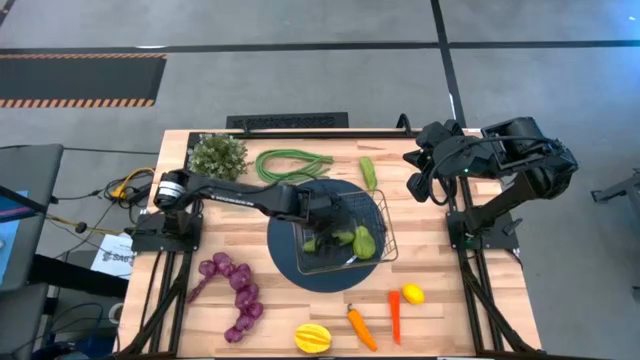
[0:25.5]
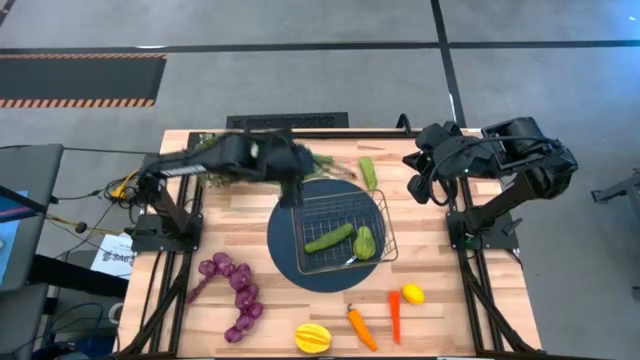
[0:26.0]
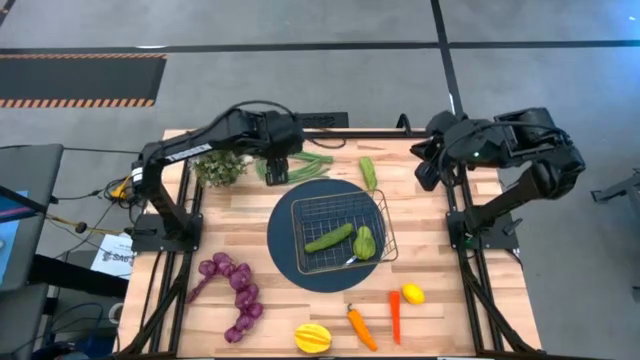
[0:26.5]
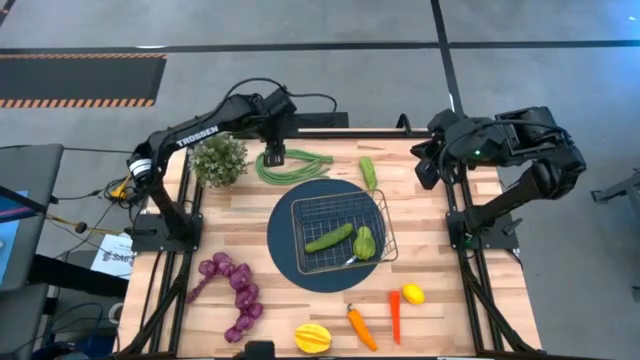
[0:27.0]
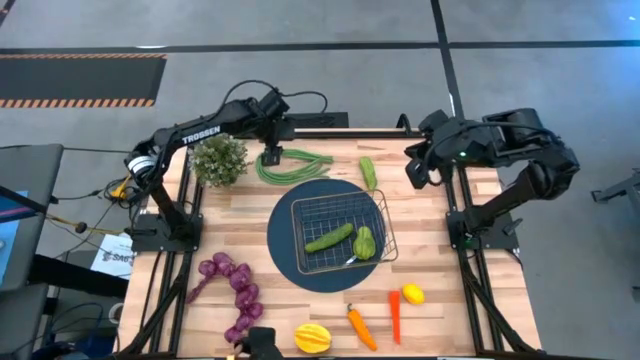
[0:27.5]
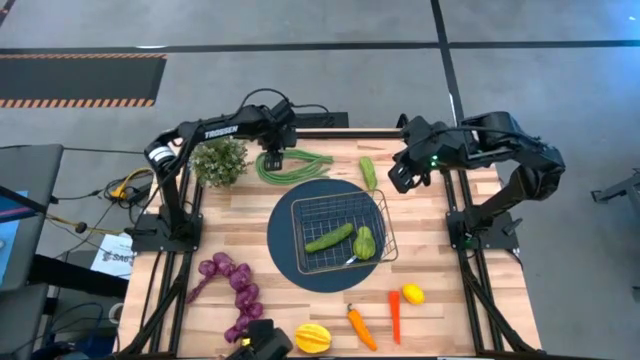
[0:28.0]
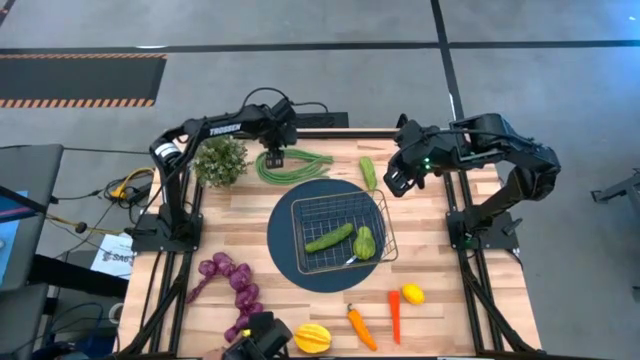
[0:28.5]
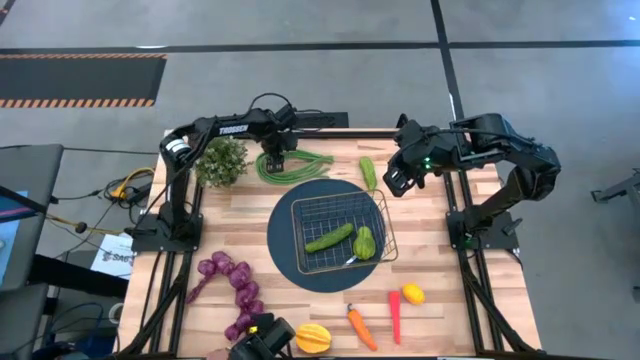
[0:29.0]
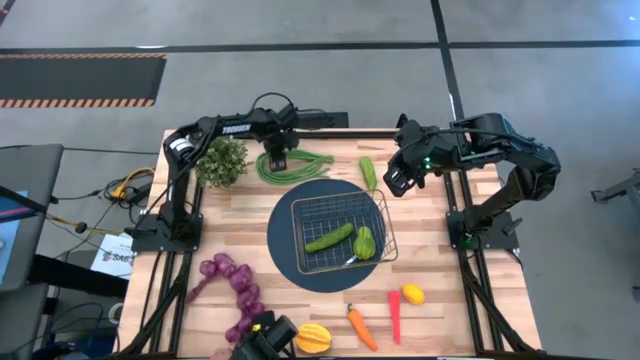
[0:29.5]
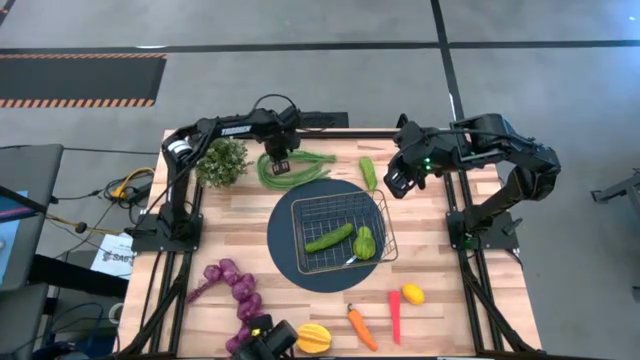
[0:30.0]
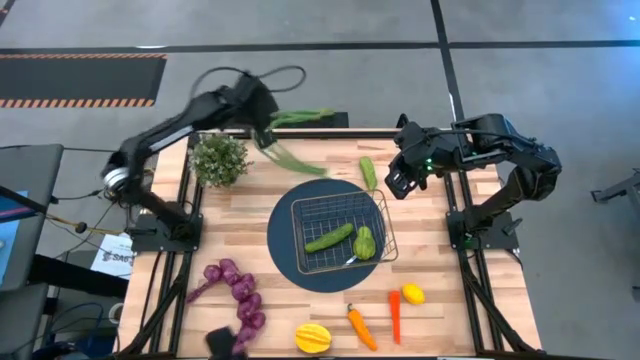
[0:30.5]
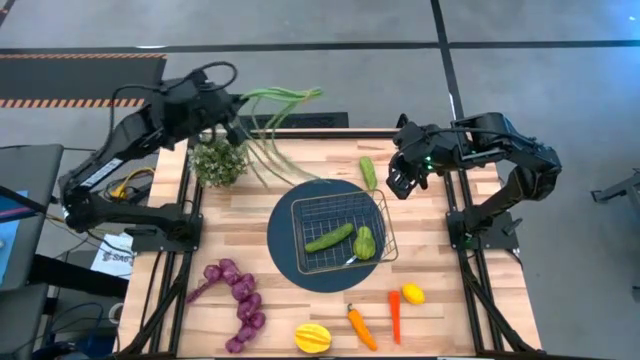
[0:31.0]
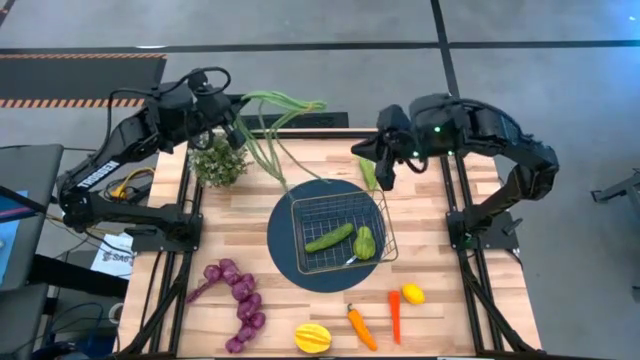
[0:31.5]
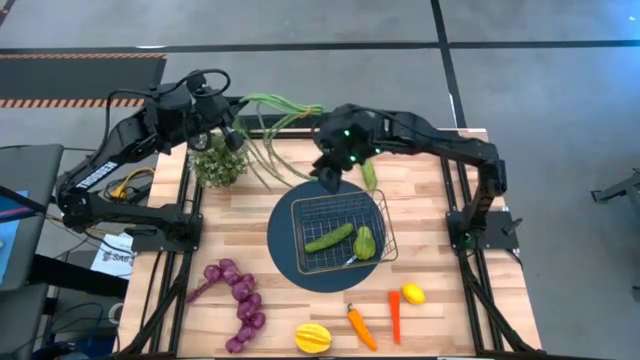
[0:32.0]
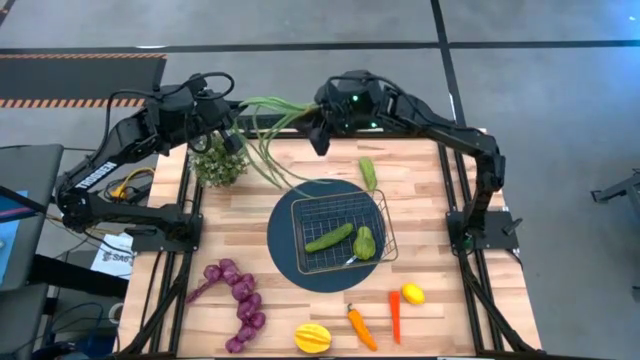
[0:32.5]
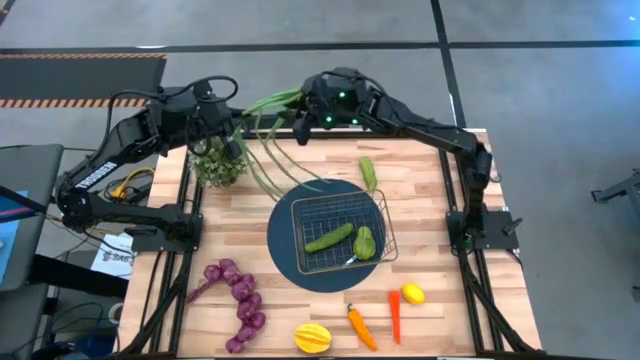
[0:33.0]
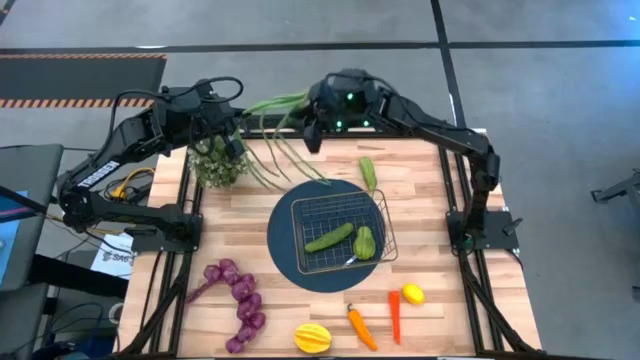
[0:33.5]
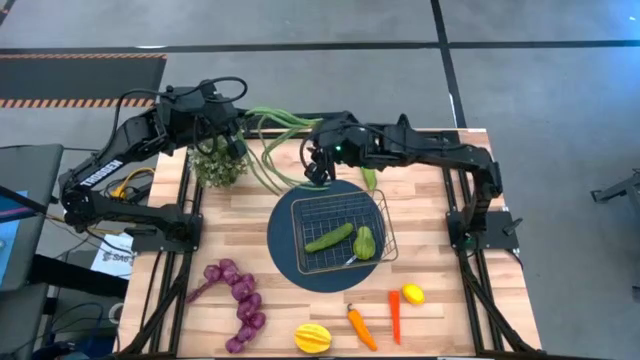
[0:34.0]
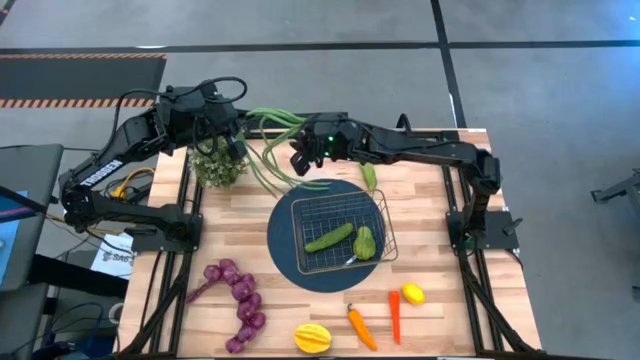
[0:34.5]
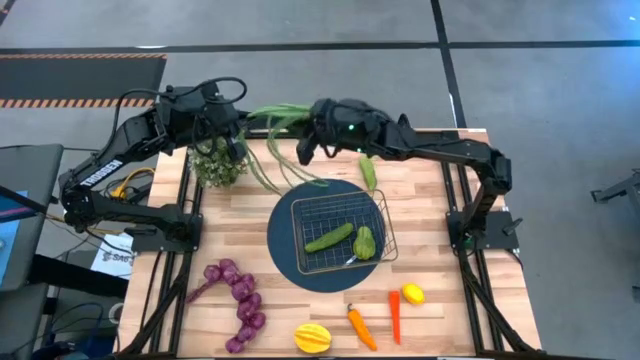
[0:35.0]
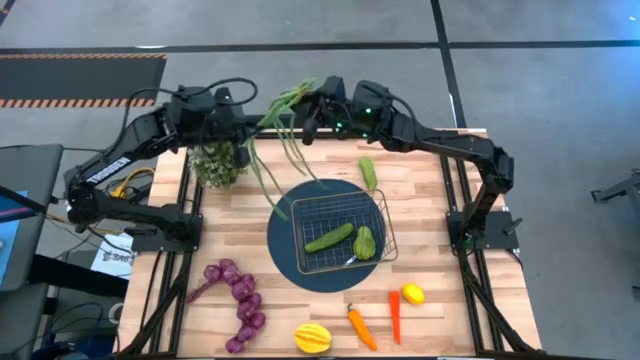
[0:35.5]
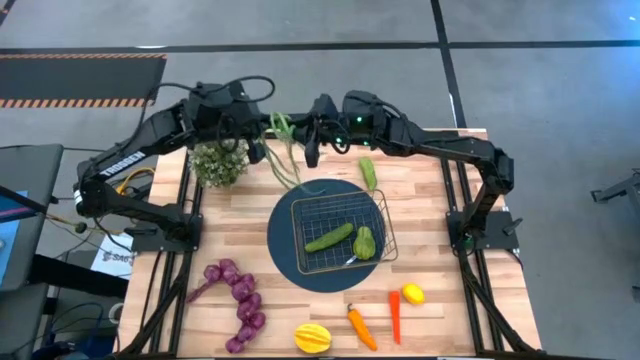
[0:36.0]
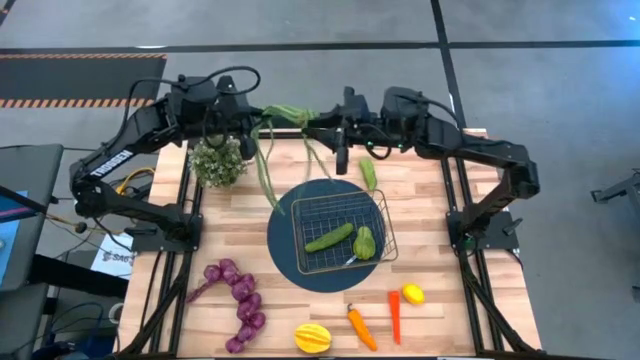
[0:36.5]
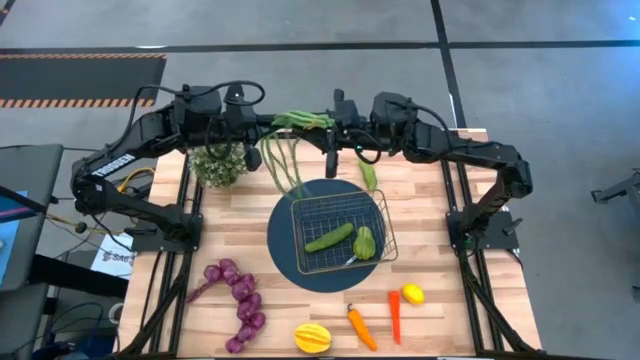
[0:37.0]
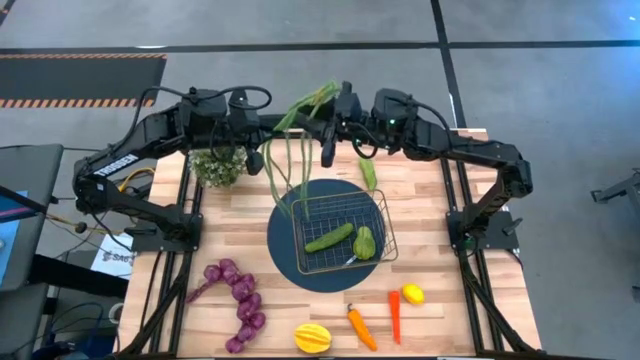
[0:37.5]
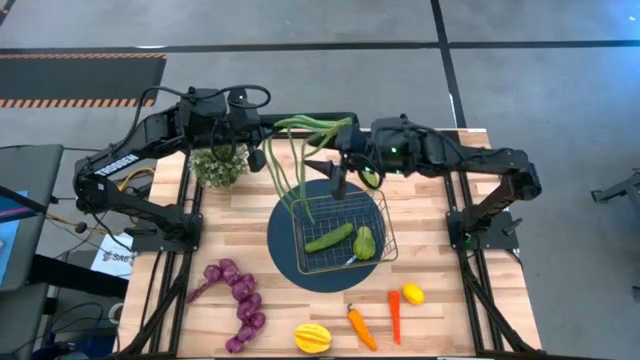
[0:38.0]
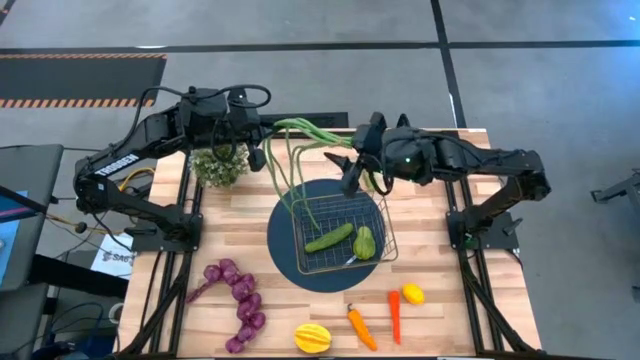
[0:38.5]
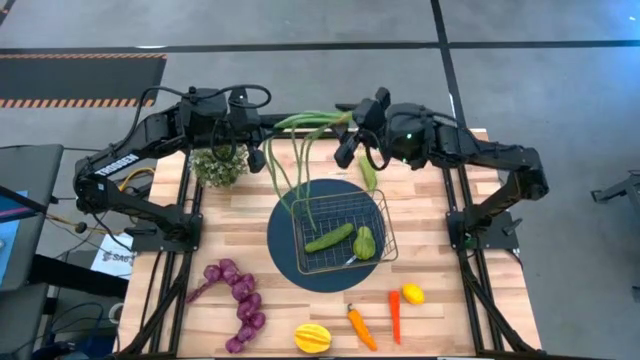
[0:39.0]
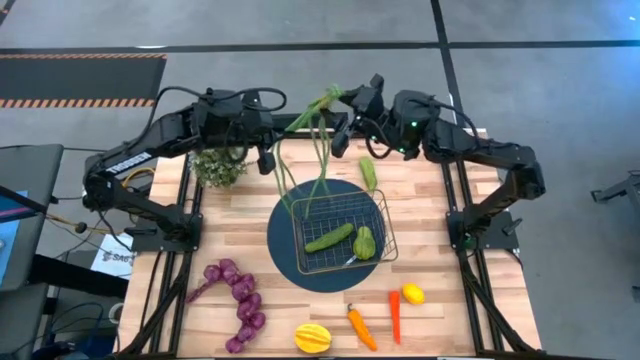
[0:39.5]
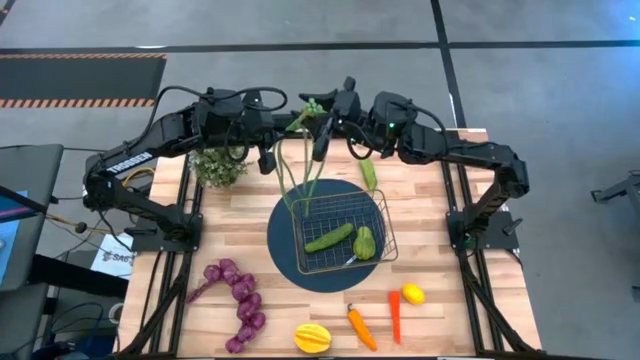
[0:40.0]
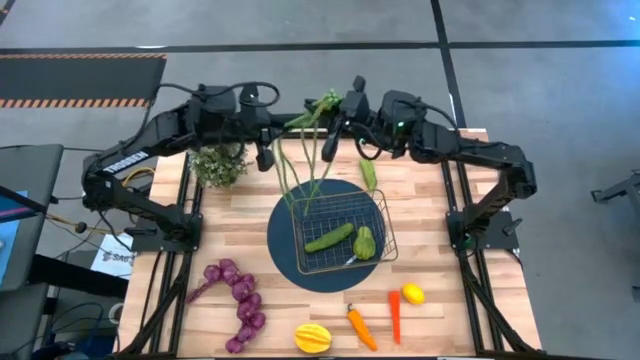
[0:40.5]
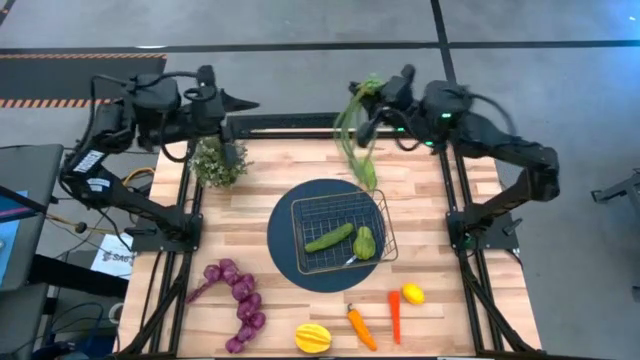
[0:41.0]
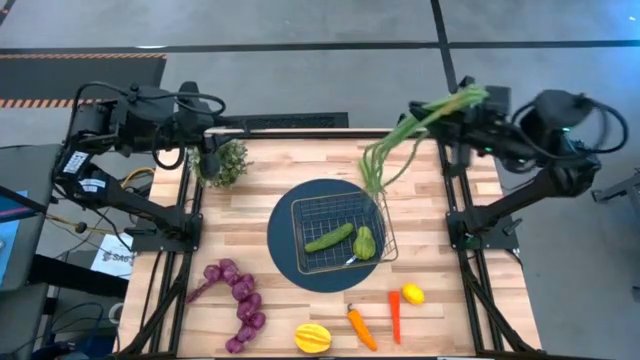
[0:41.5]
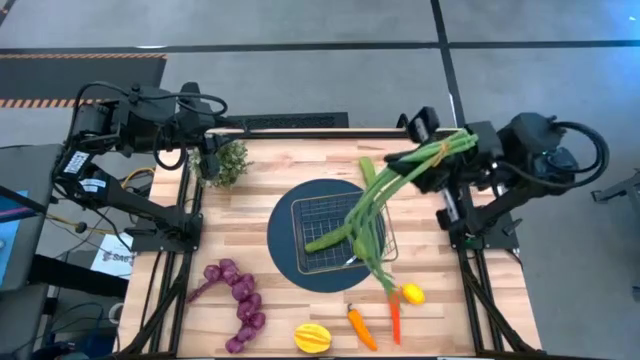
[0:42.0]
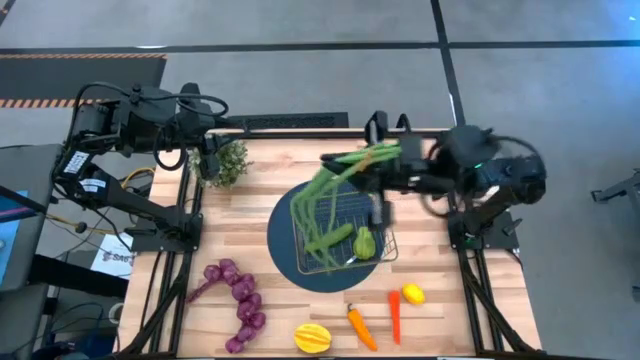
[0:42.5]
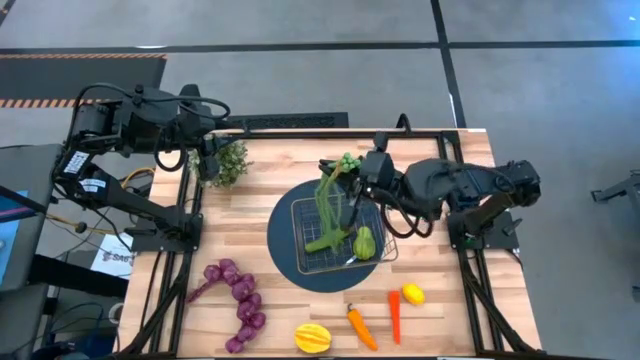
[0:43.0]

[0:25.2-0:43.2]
Task: Build produce basket
Put the green beans into the gold wire basket
